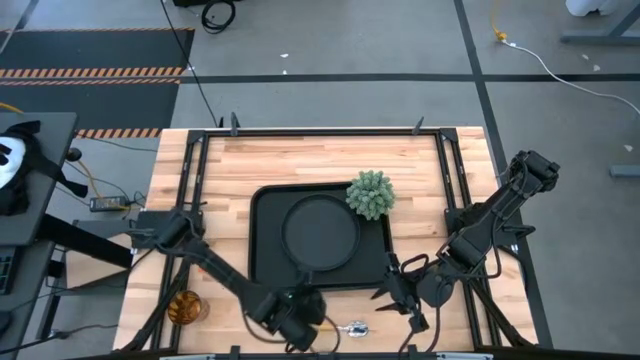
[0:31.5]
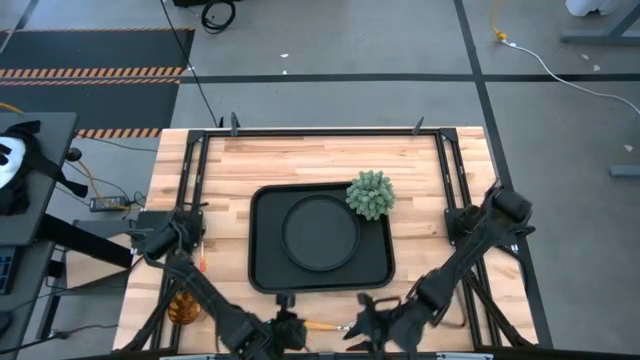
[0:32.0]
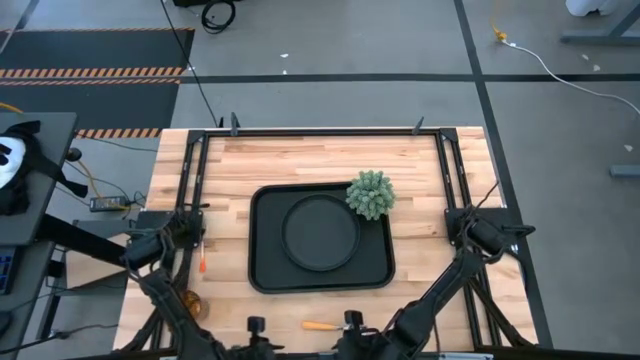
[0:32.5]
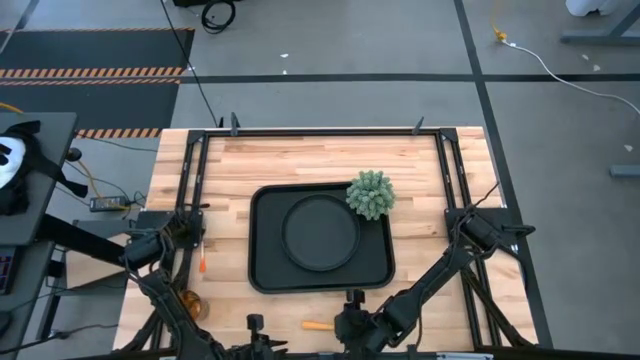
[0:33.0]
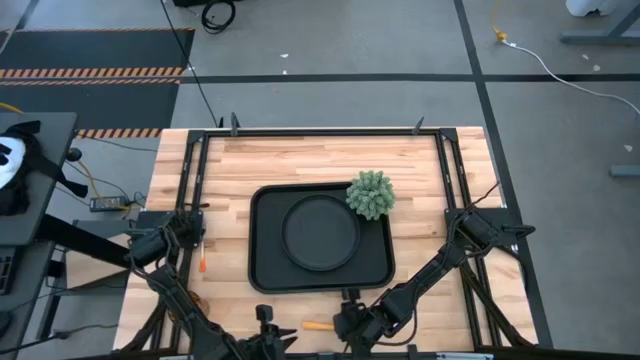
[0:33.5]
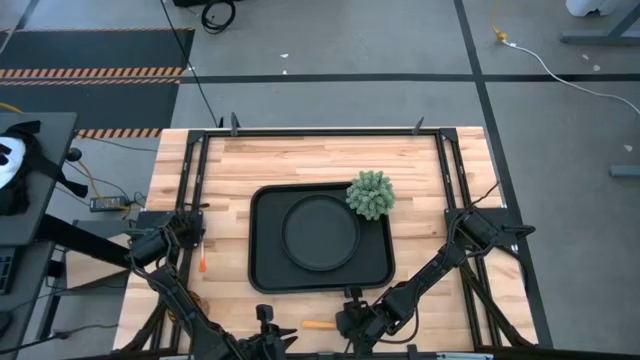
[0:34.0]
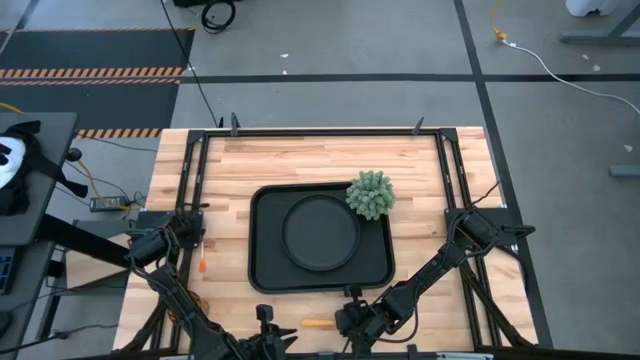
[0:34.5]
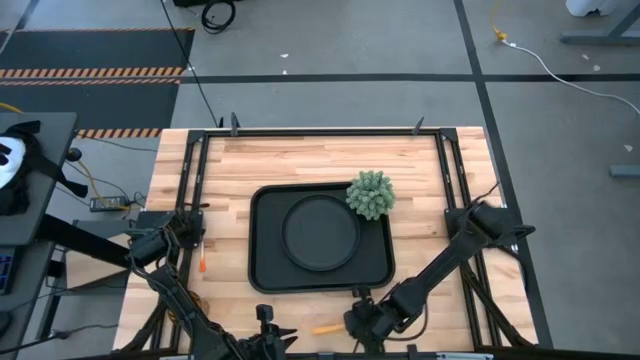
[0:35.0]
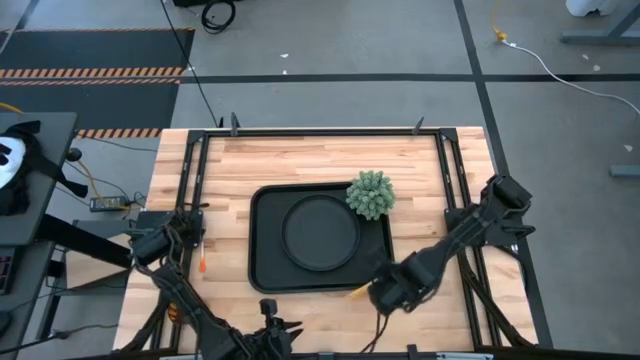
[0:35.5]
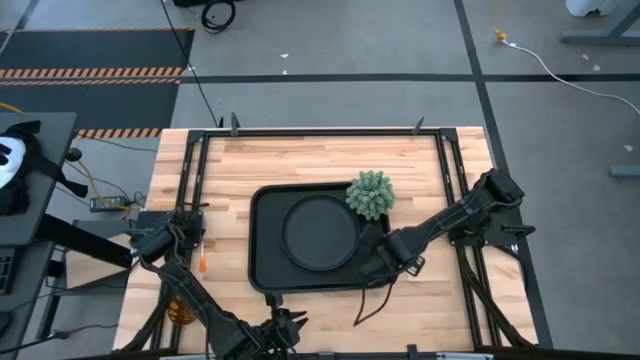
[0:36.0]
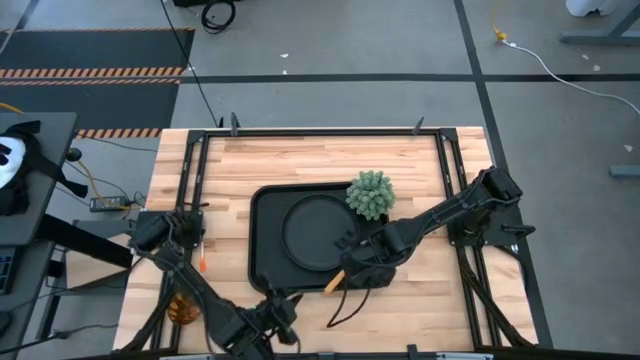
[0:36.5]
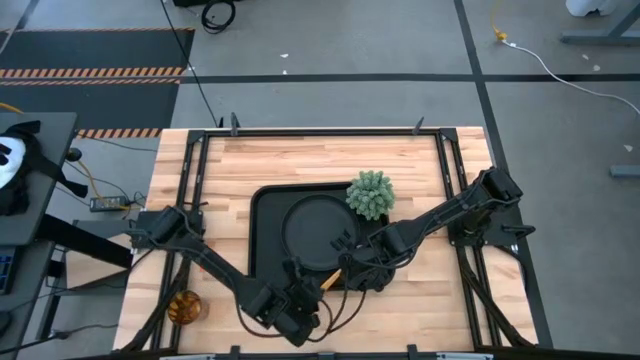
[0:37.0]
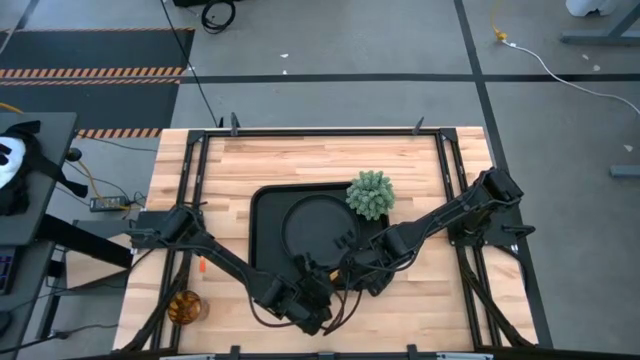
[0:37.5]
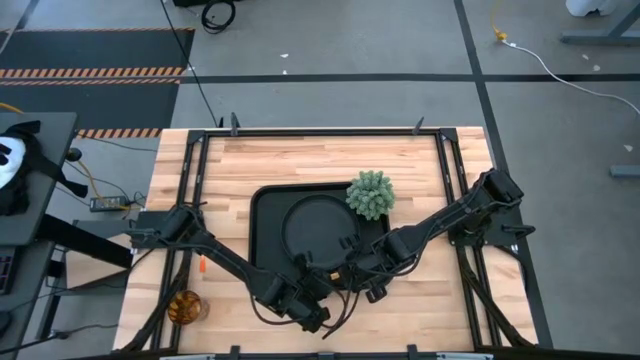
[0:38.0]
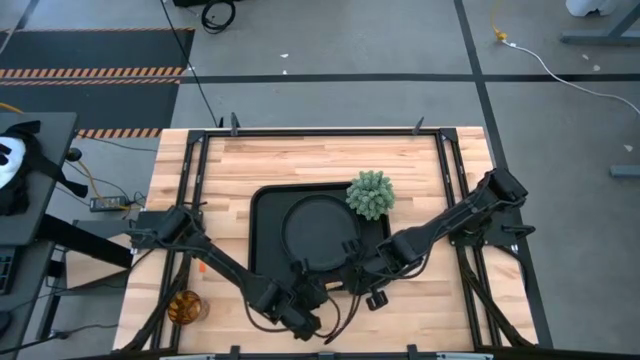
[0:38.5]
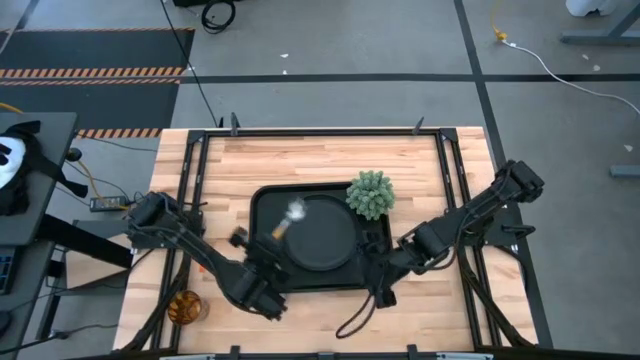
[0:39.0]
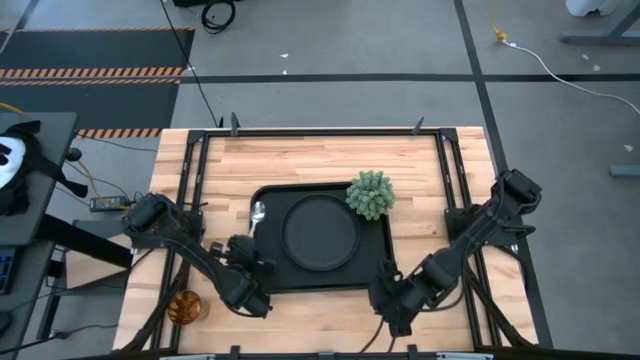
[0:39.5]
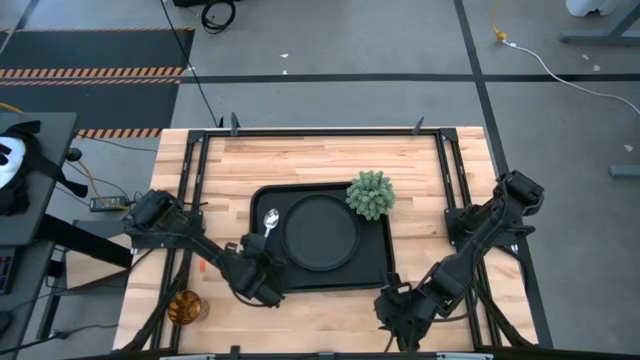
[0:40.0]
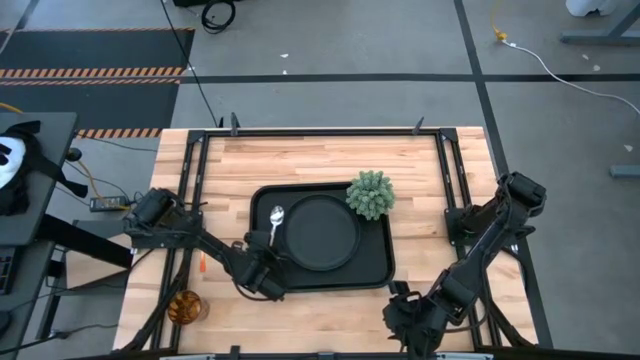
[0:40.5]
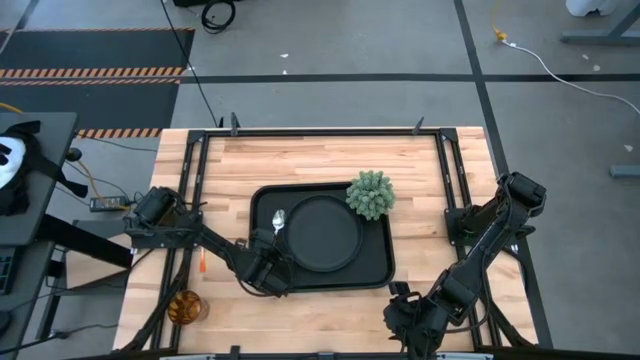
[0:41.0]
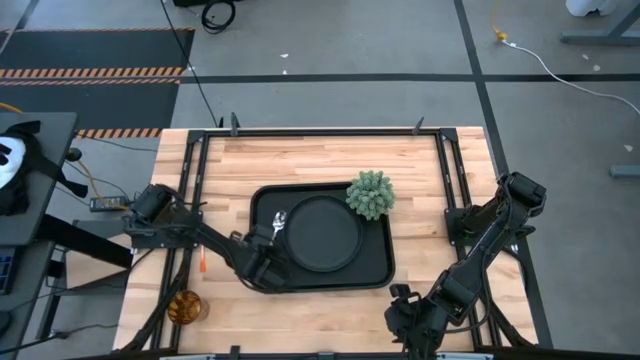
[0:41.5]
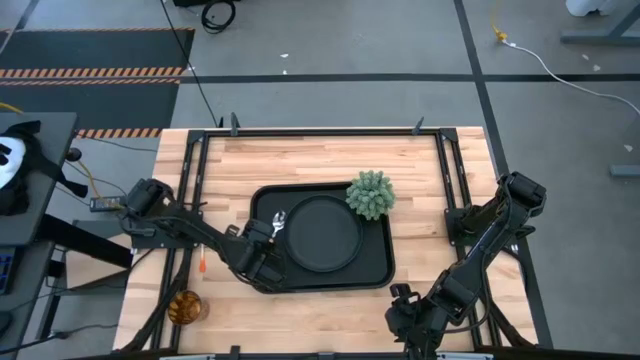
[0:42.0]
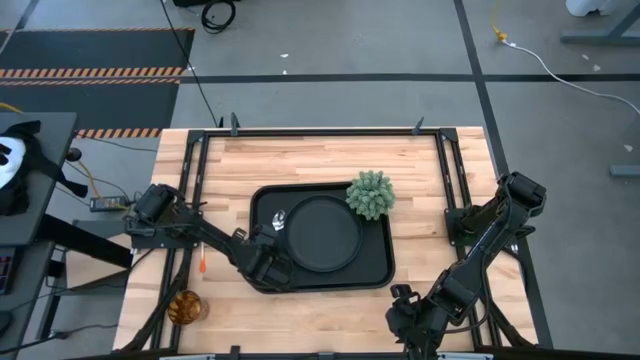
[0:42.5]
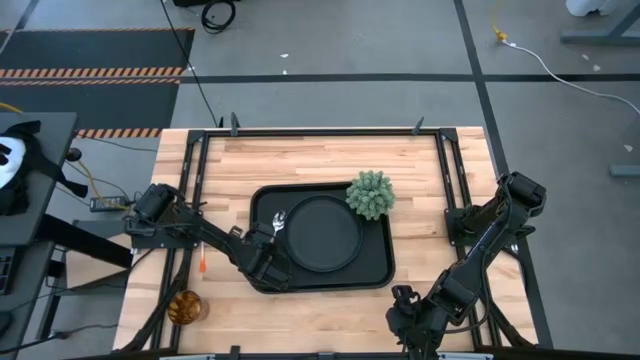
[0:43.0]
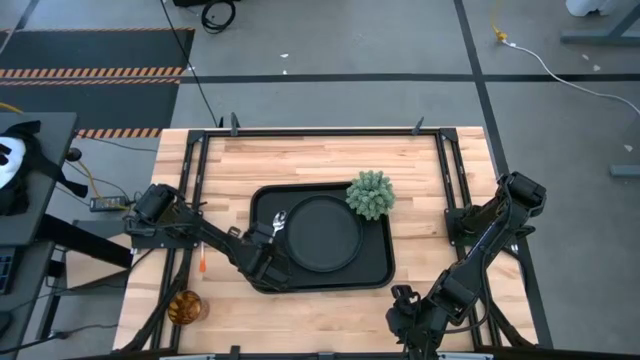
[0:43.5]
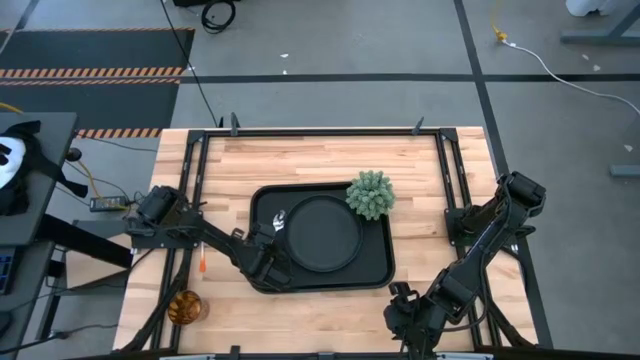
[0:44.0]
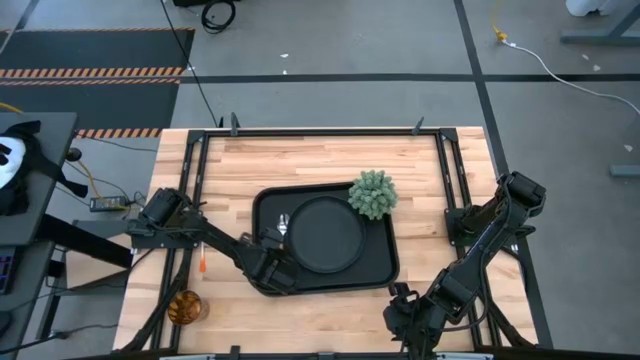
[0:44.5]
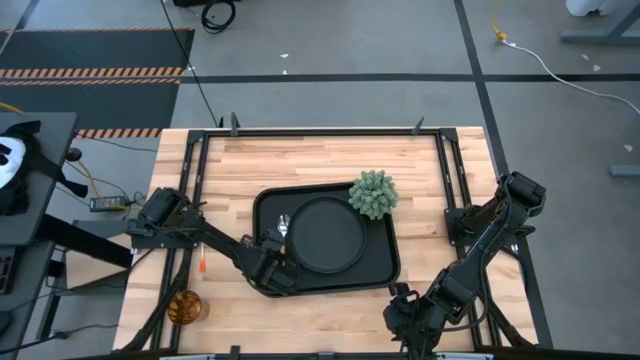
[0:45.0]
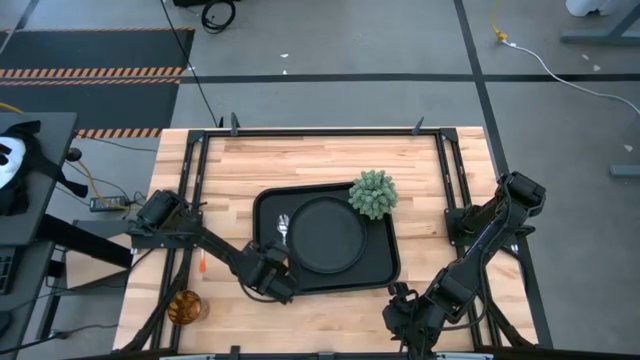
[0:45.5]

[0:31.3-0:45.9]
Task: Pick and place plate/cup/fork/spoon on tray
Put the orange spoon on the black tray to the left of the black plate

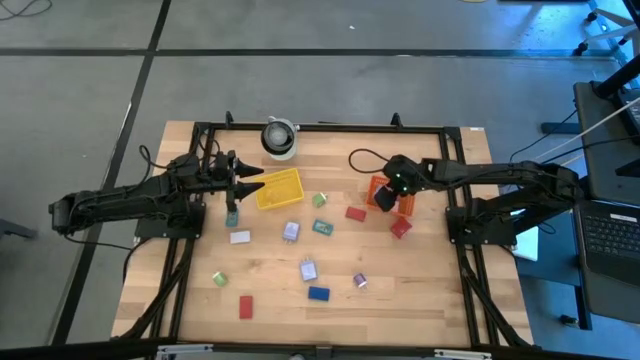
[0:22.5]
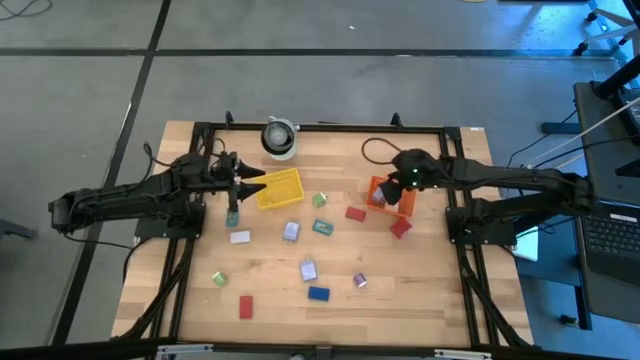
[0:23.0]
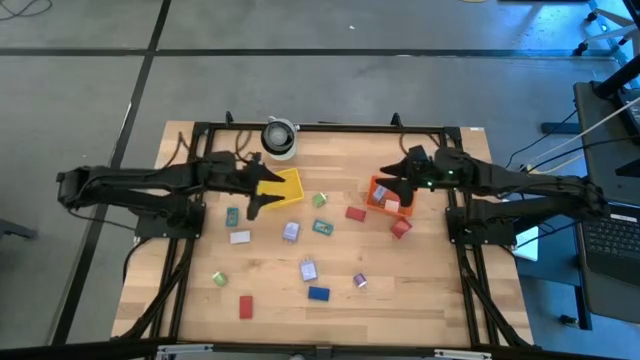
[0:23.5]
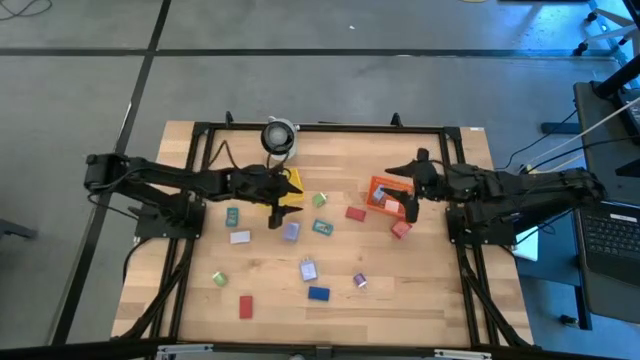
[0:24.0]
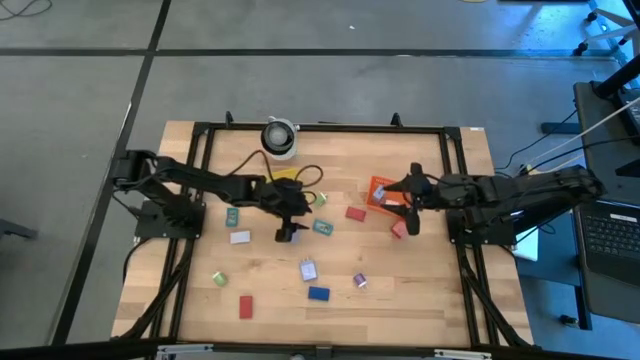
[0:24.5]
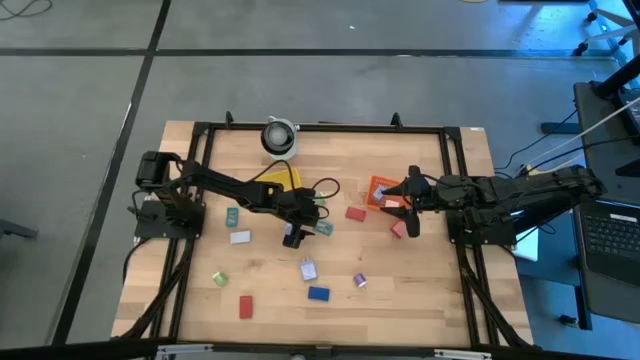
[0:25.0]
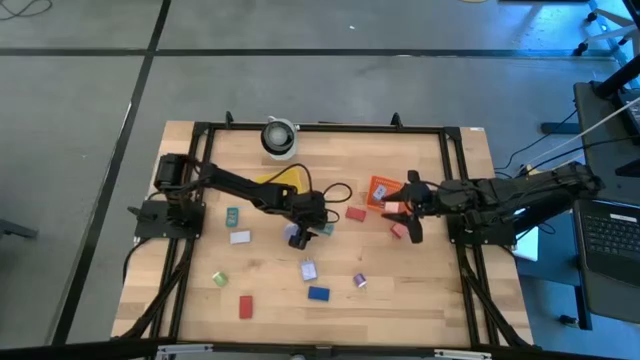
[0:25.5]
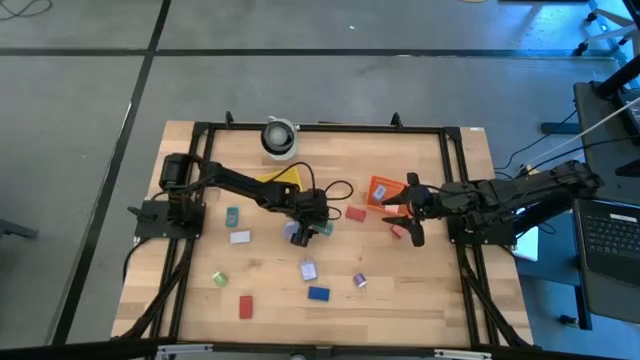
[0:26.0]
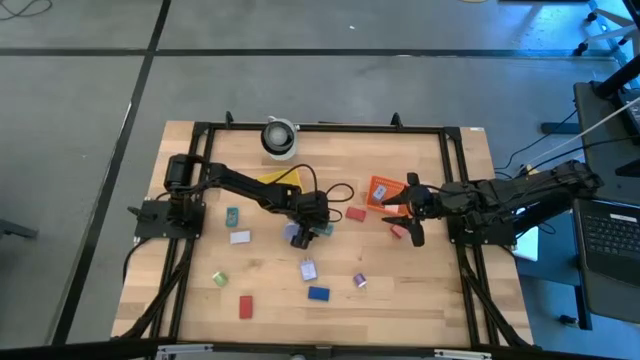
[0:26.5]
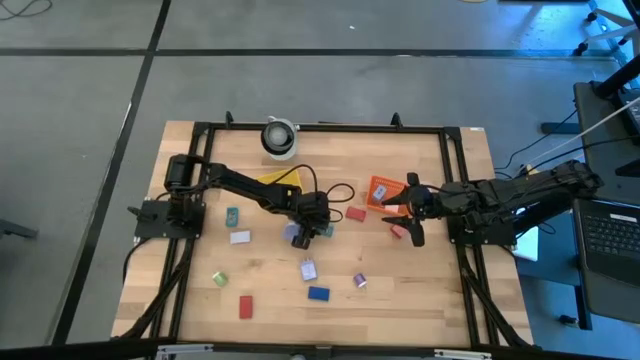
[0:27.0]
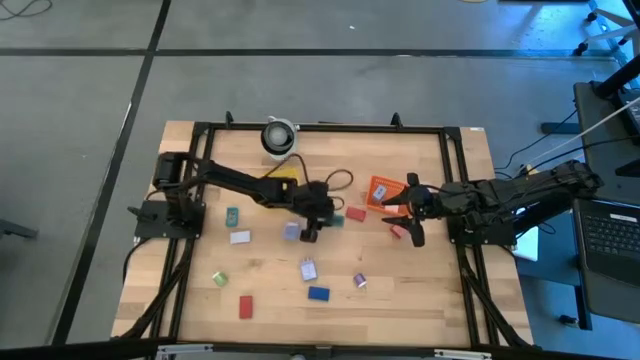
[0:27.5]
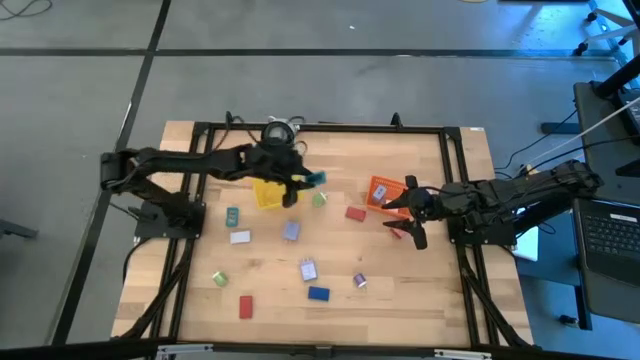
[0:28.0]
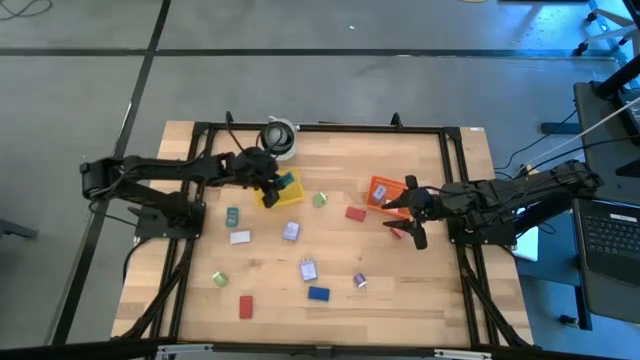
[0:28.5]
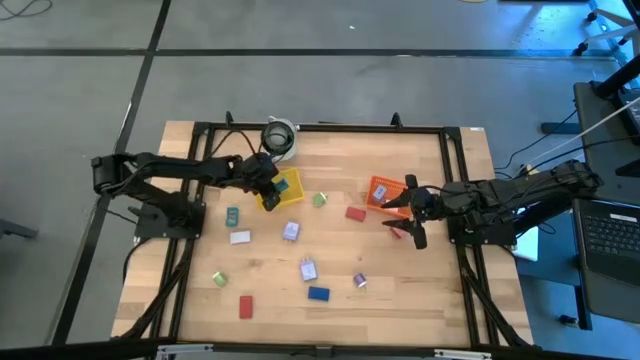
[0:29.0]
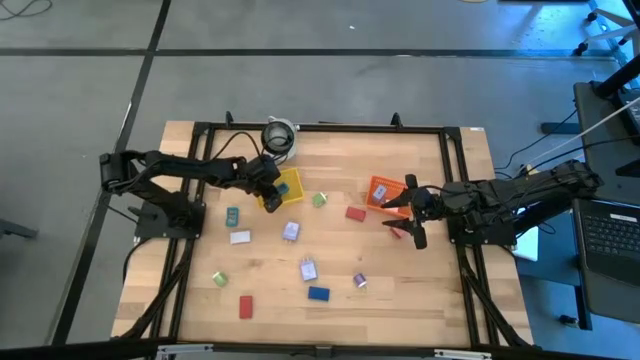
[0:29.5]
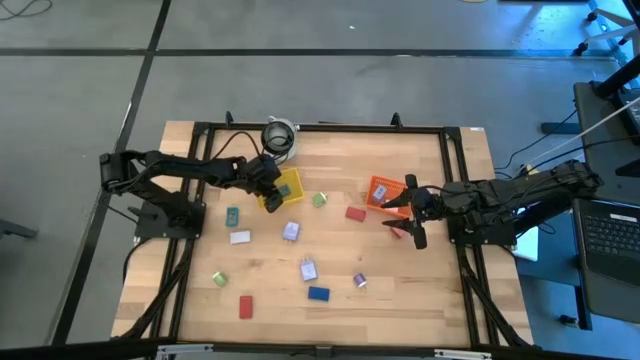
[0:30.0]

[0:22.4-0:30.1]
Task: Pick & Place Office items
Put the right light blue digital clock into the yellow bin
